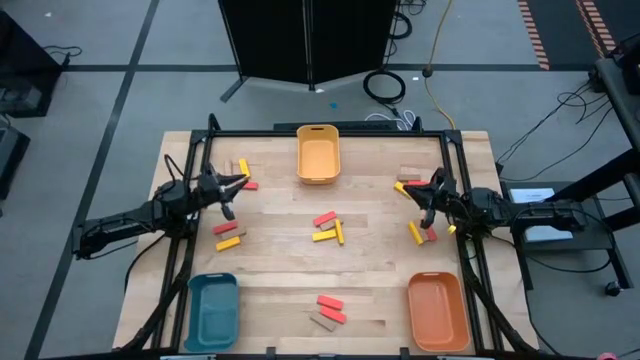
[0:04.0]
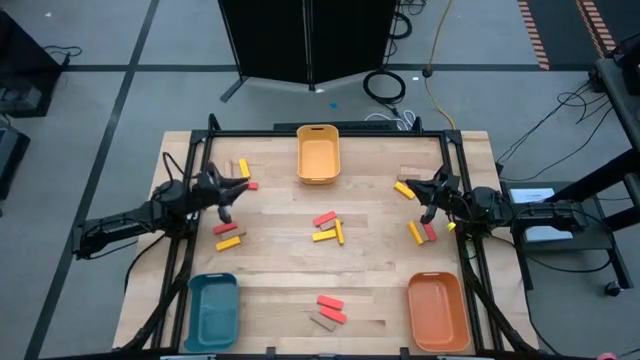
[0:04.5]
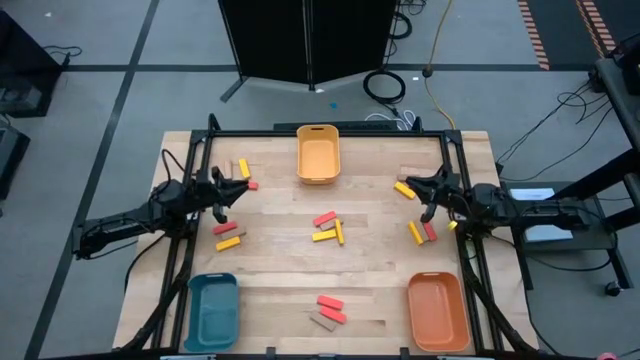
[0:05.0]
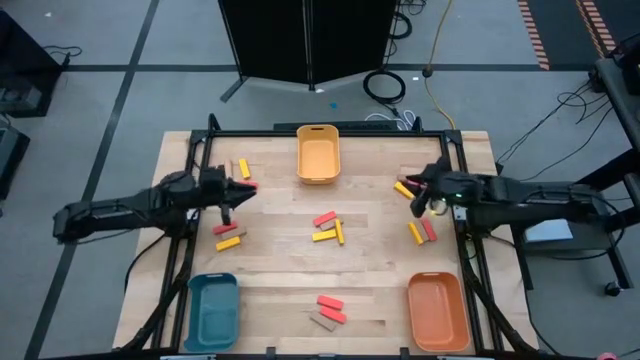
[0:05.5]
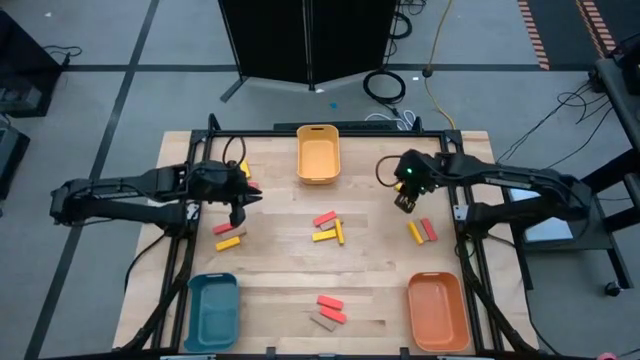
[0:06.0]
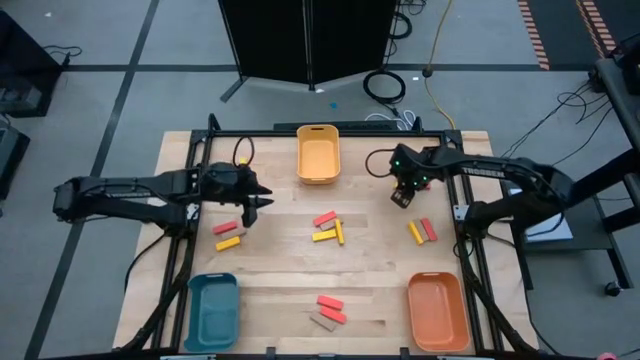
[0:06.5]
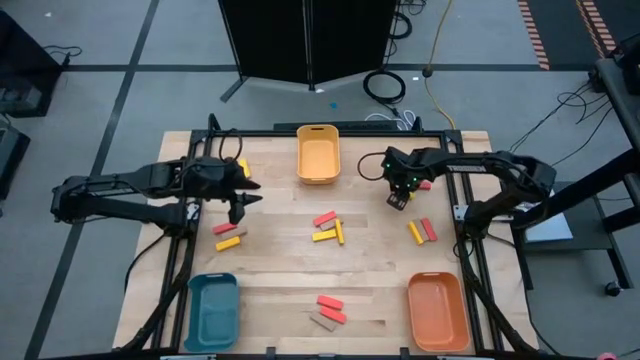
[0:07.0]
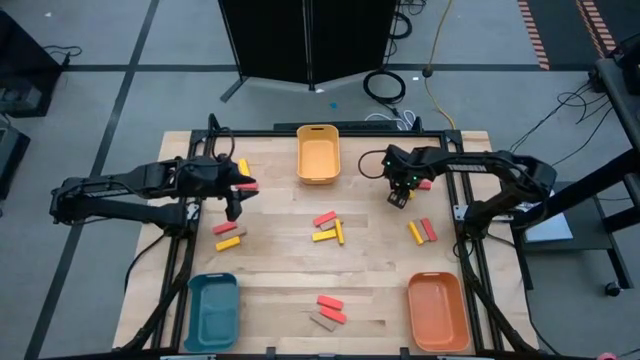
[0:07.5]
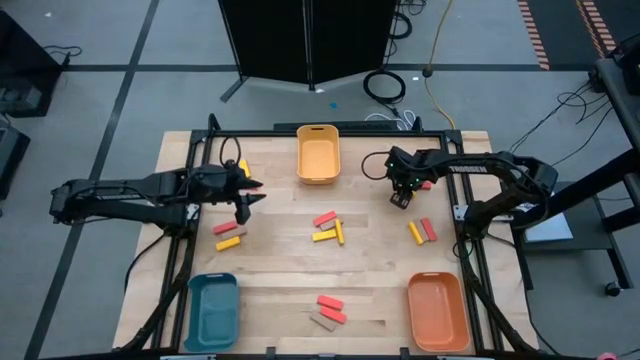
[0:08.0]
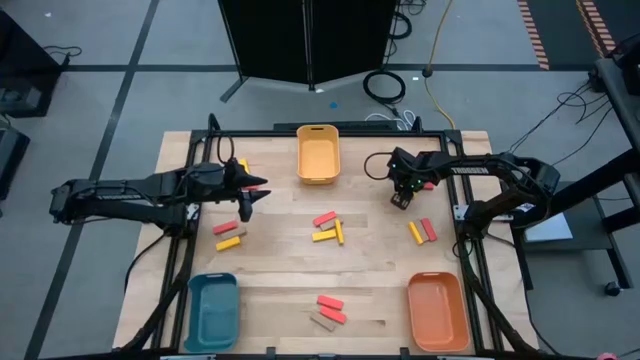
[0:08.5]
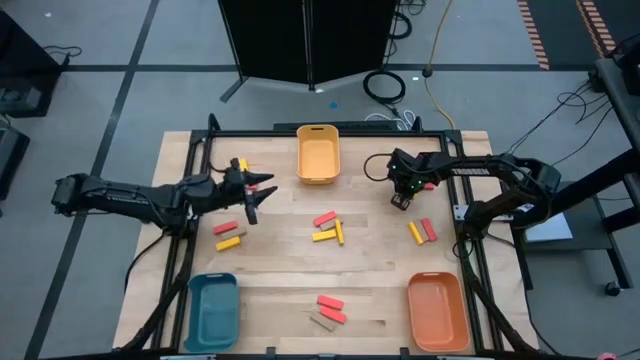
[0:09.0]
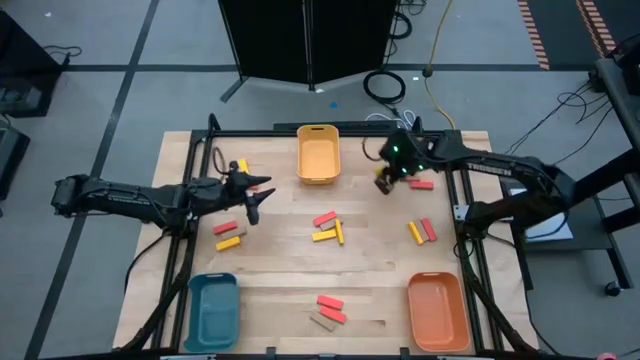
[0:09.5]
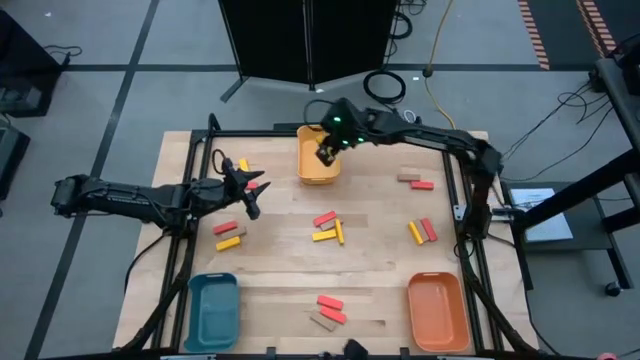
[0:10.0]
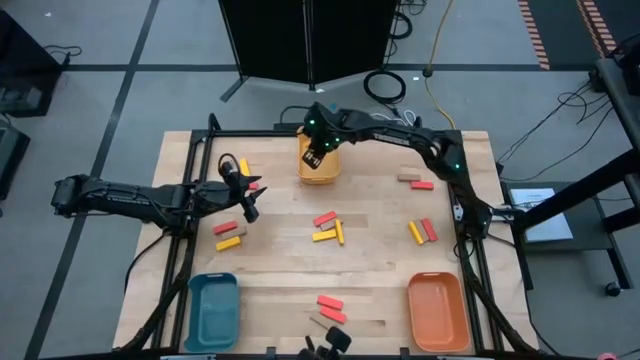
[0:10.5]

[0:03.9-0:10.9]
Task: Sort blocks
Put the yellow block into the yellow bin

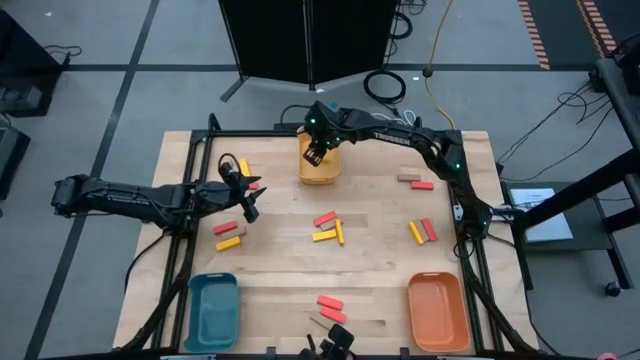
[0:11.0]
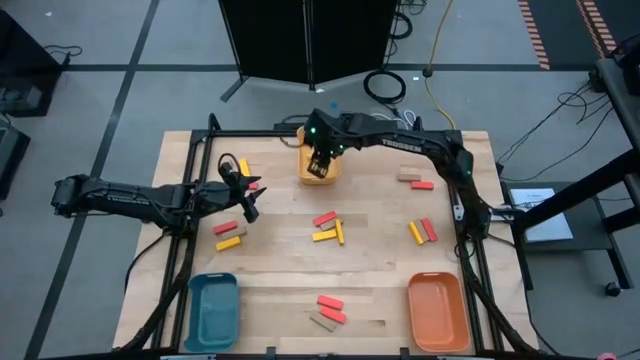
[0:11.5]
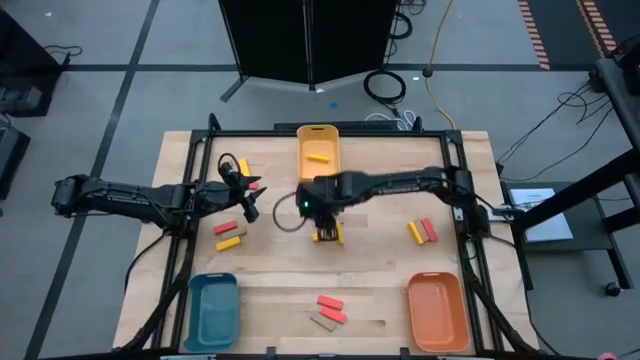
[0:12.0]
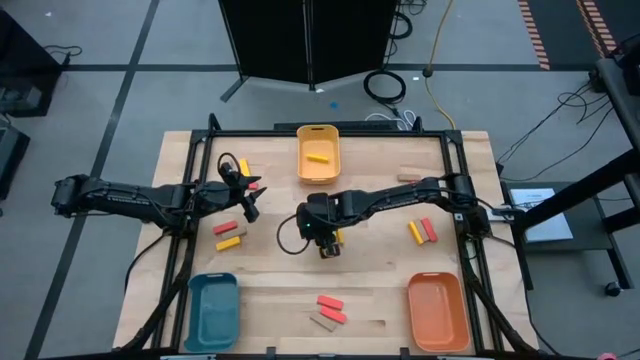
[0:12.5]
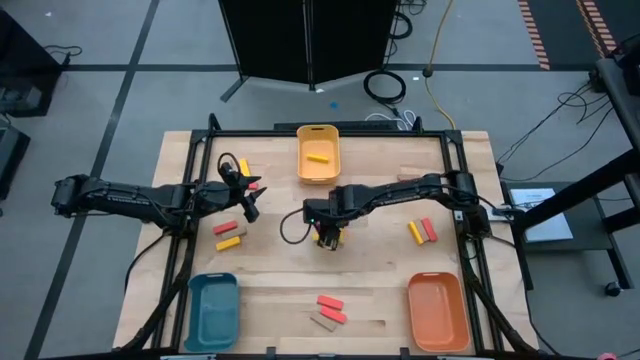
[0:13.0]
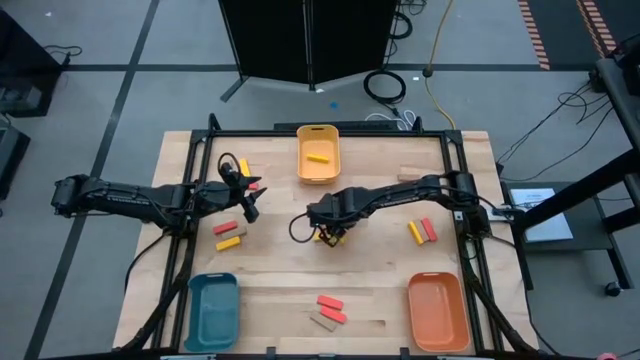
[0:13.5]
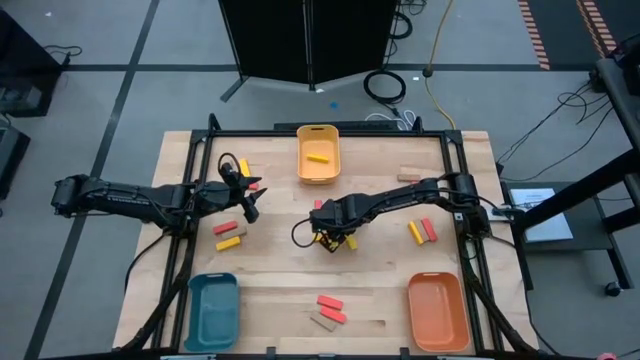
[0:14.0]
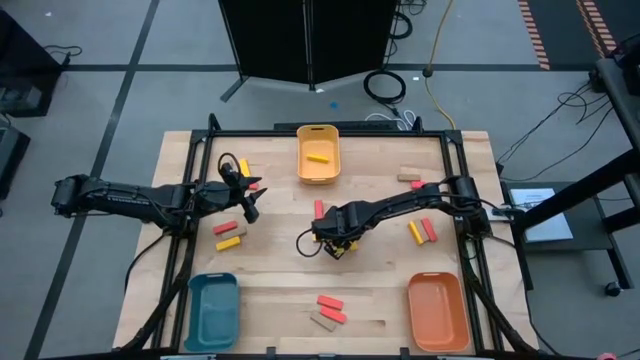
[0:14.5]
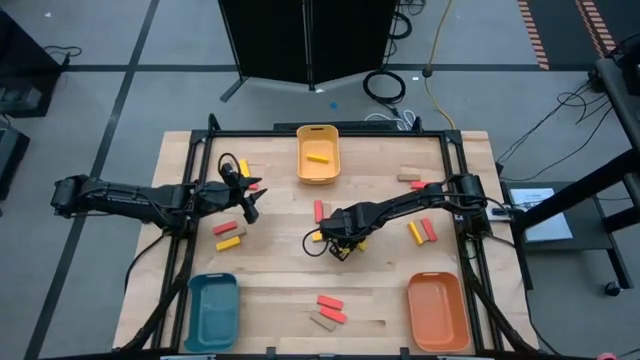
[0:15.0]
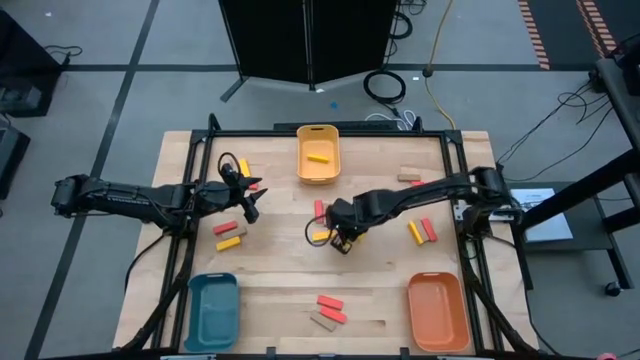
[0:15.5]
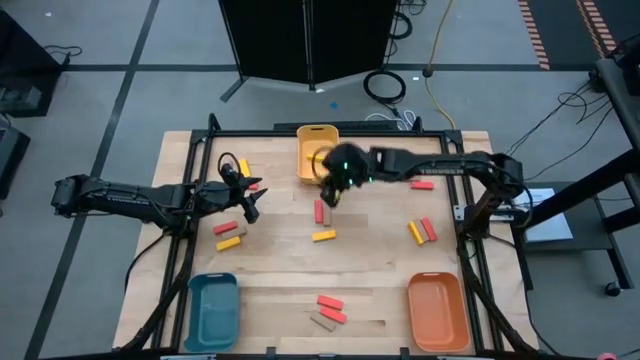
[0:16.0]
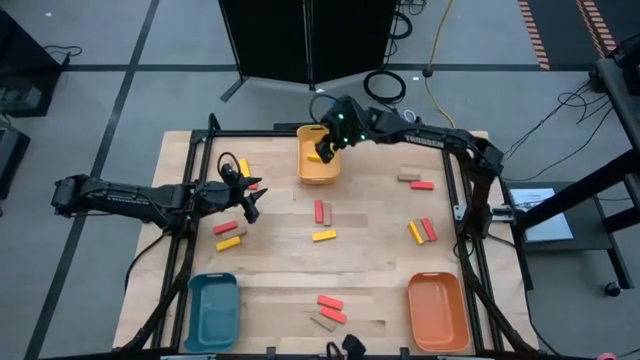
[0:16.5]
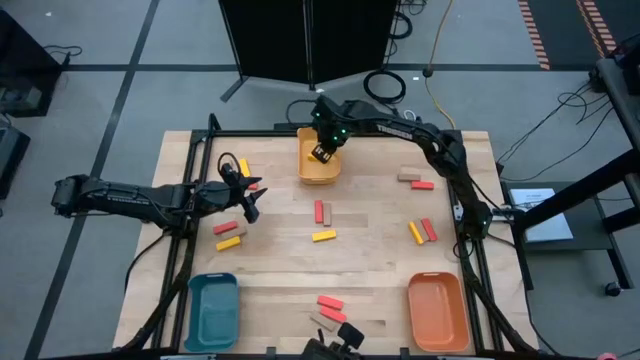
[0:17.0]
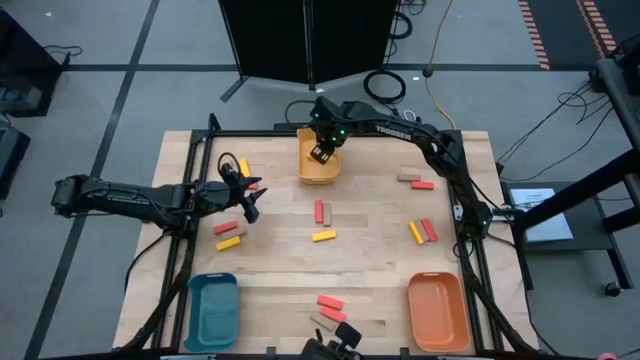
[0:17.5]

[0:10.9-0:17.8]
Put the yellow block into the yellow bin

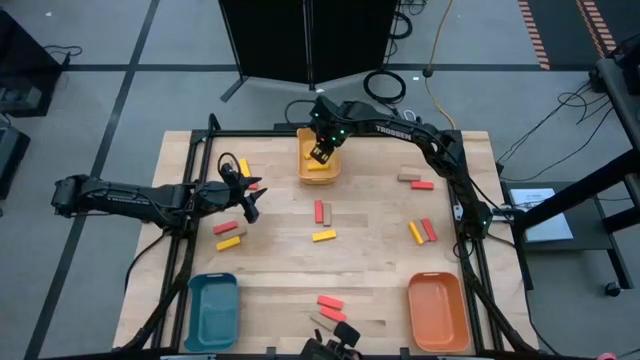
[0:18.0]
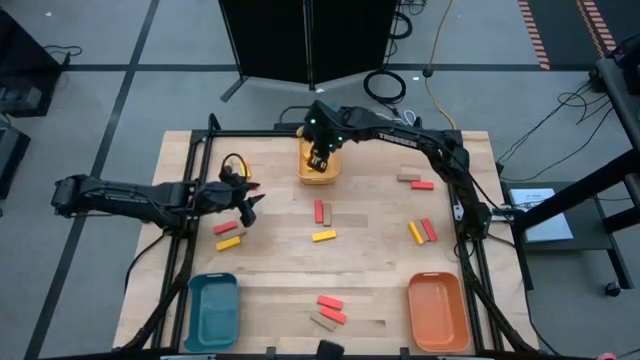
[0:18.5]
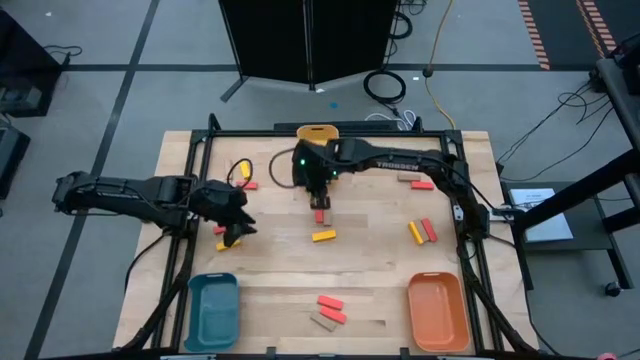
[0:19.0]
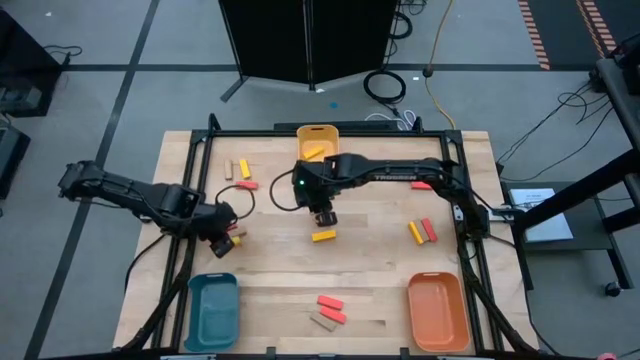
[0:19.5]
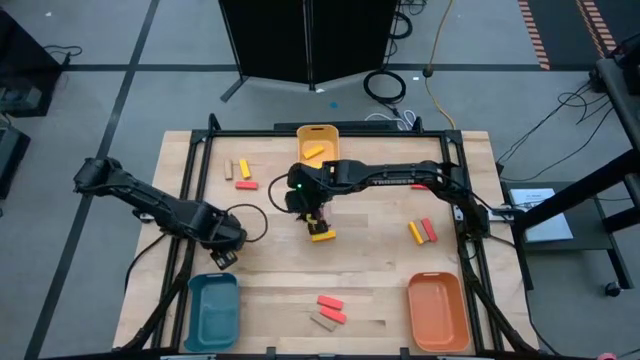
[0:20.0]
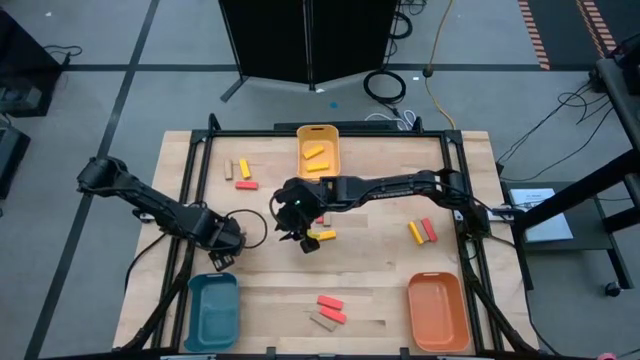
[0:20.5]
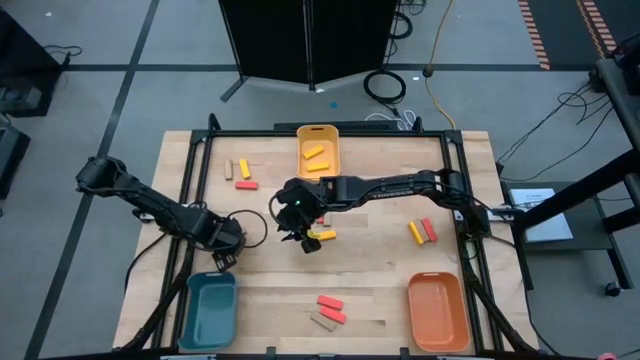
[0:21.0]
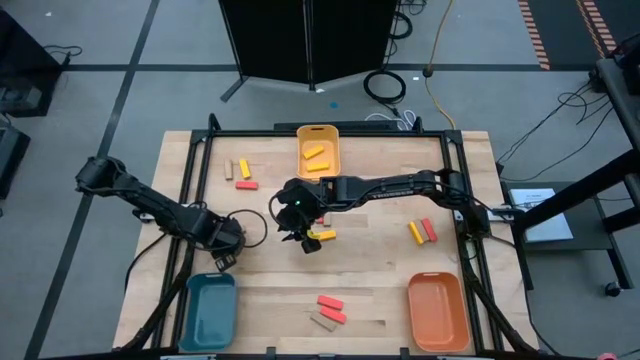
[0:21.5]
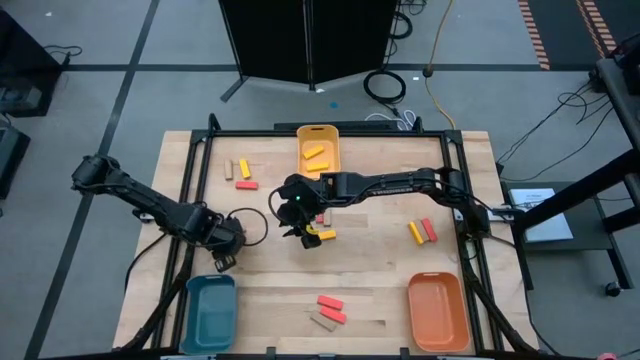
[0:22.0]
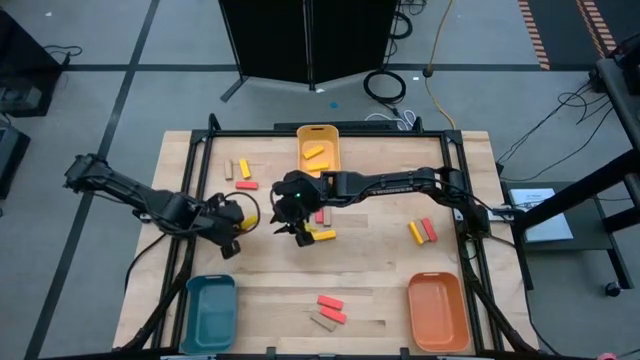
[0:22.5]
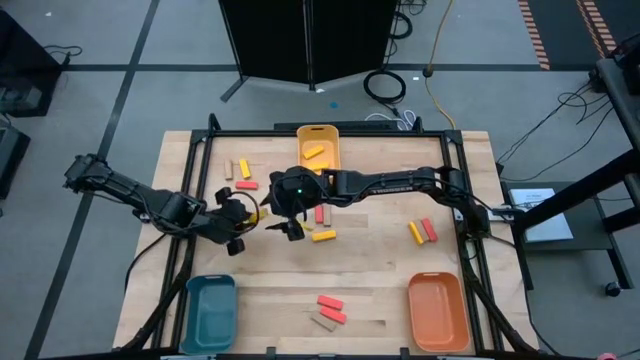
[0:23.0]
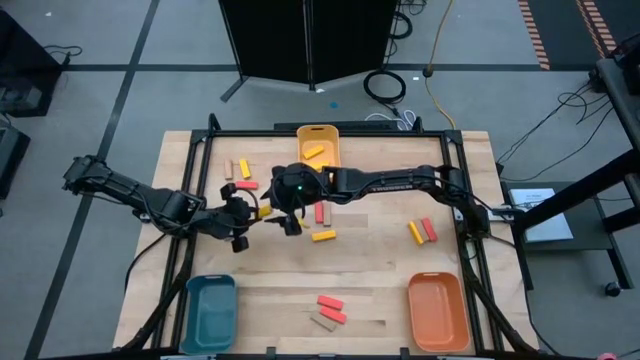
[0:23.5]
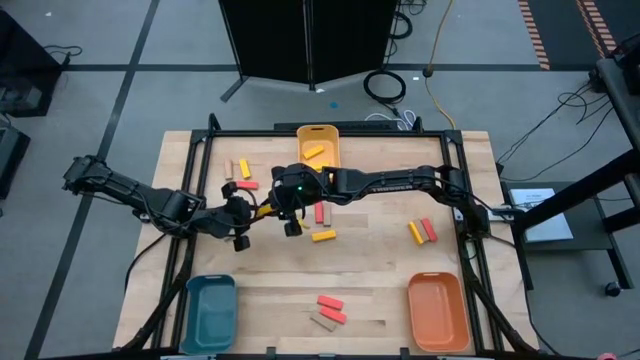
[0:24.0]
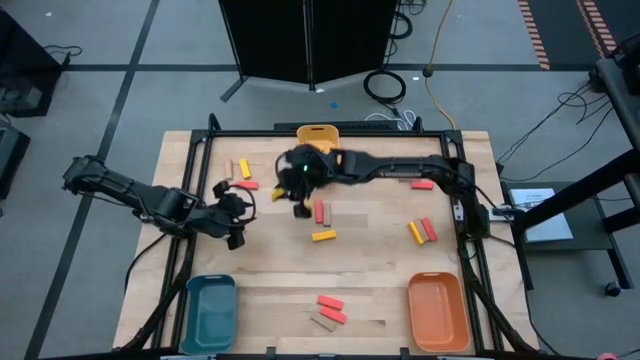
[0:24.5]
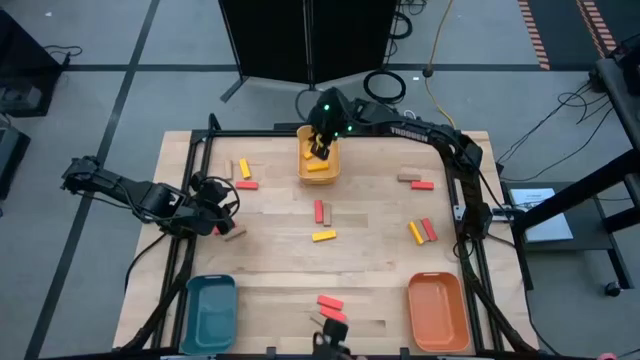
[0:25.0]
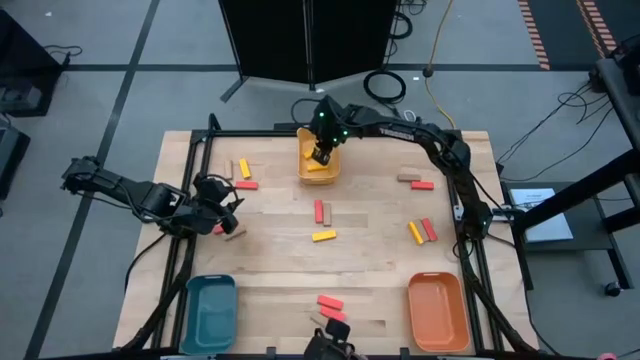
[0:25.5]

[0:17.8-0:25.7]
Put the yellow block into the yellow bin
